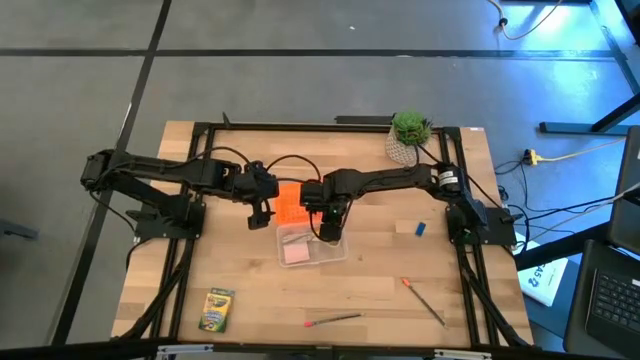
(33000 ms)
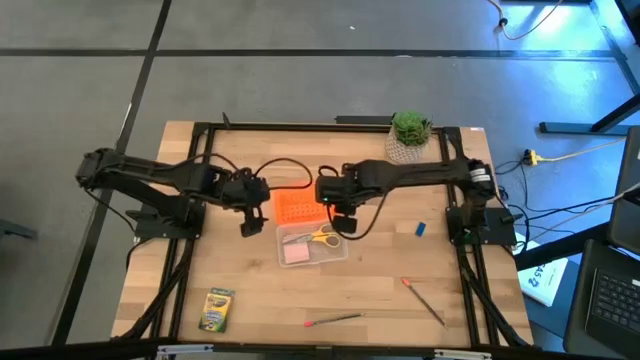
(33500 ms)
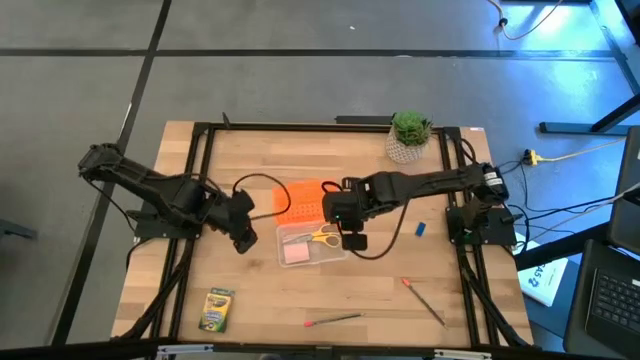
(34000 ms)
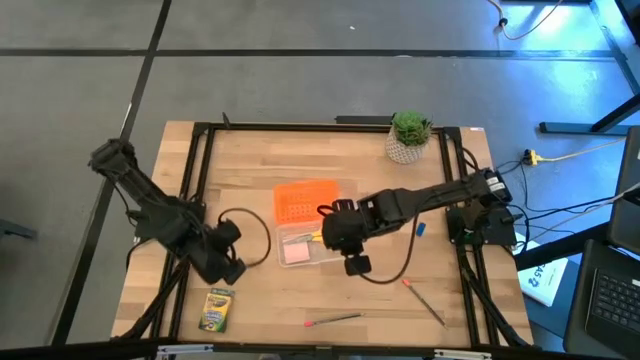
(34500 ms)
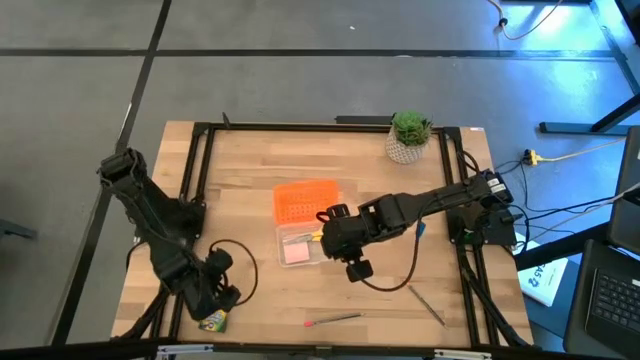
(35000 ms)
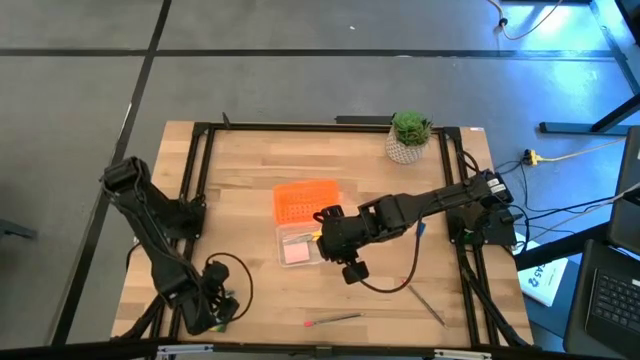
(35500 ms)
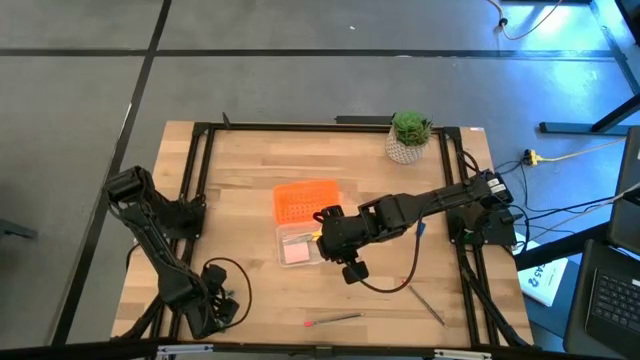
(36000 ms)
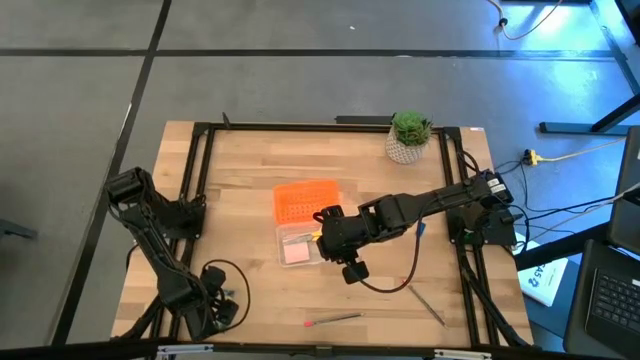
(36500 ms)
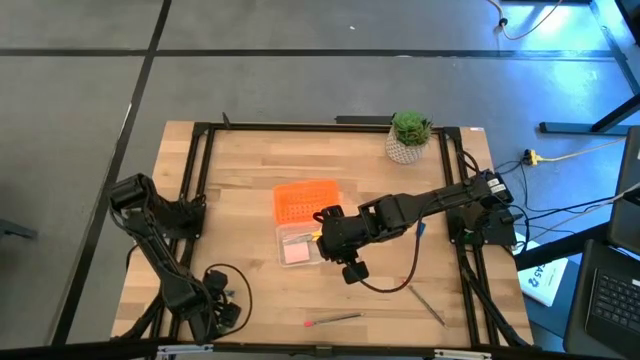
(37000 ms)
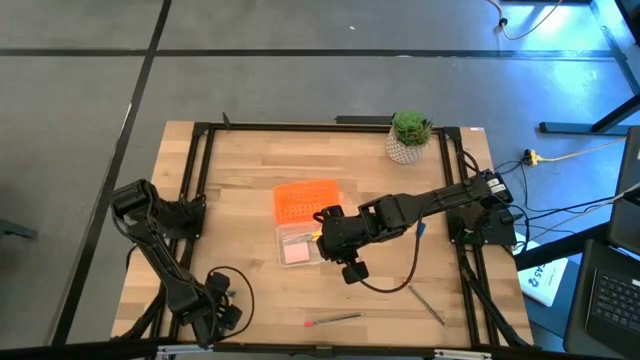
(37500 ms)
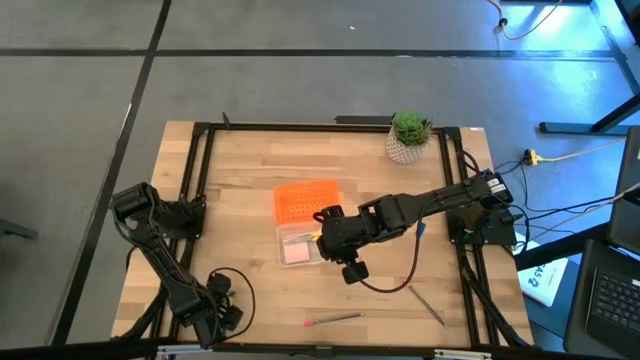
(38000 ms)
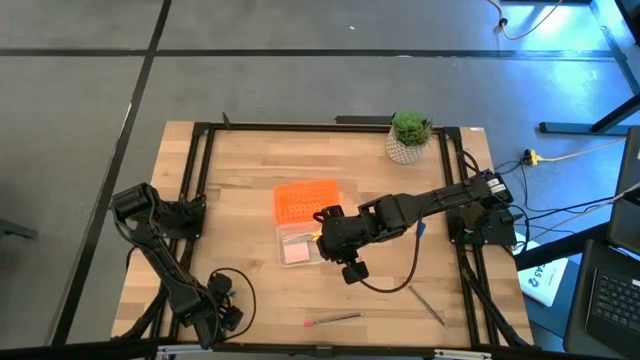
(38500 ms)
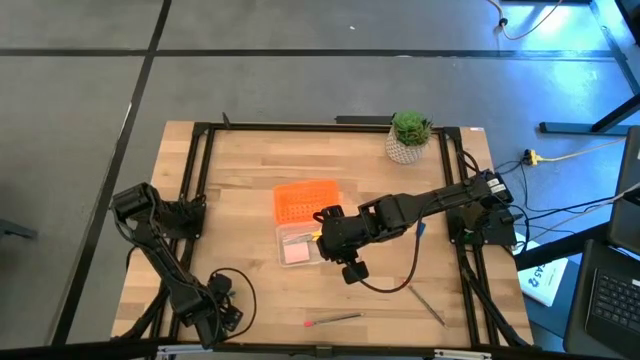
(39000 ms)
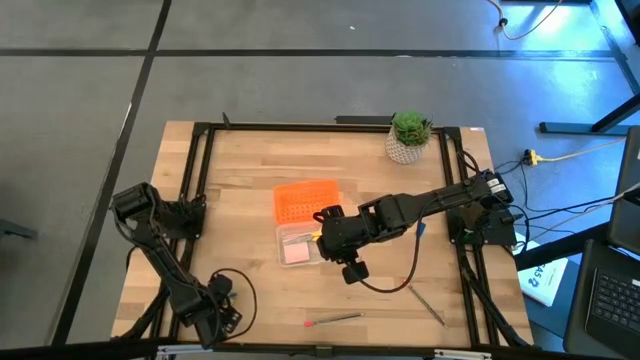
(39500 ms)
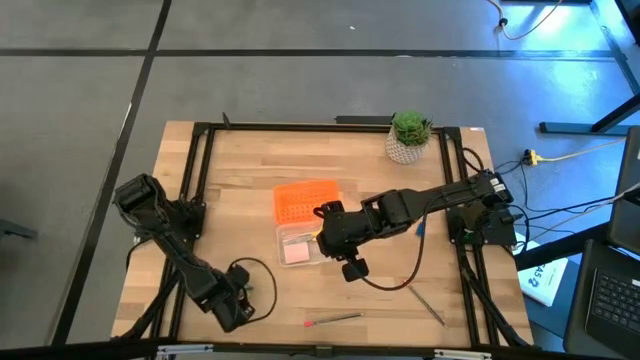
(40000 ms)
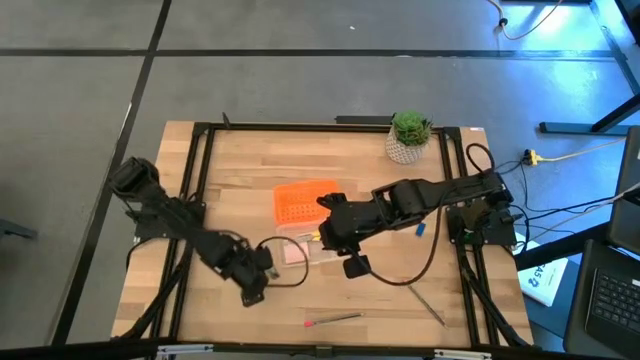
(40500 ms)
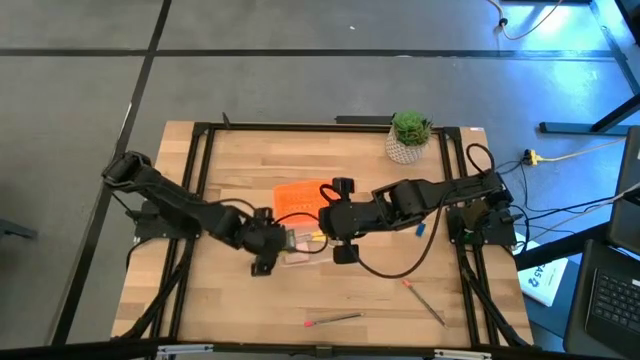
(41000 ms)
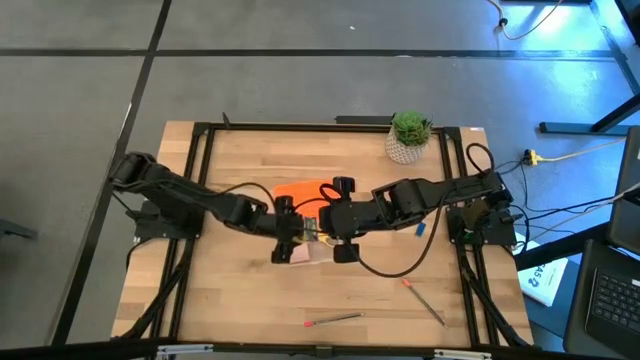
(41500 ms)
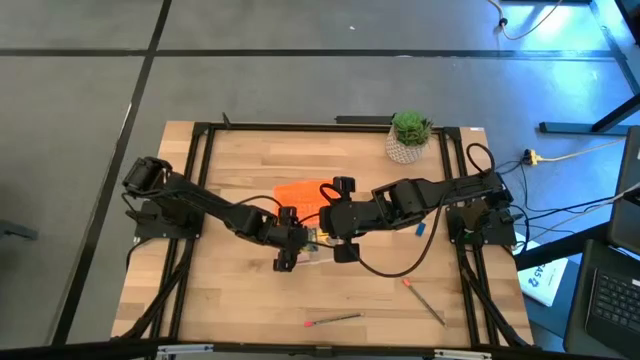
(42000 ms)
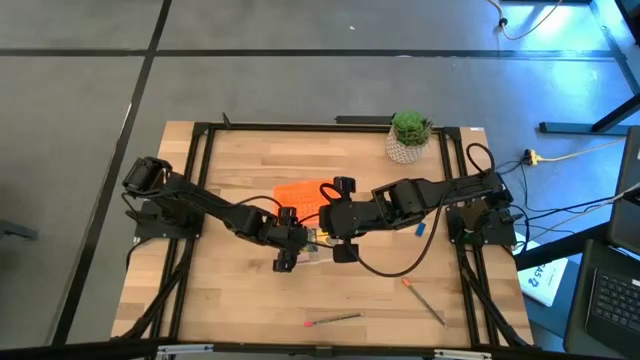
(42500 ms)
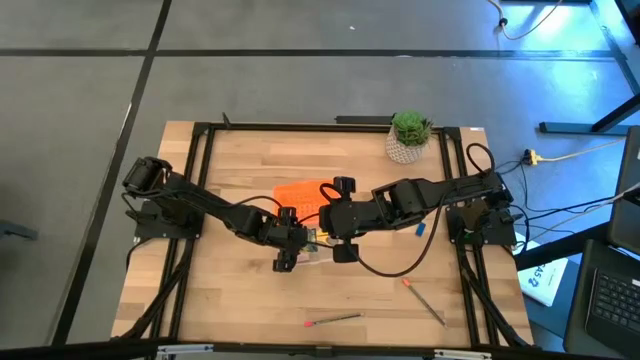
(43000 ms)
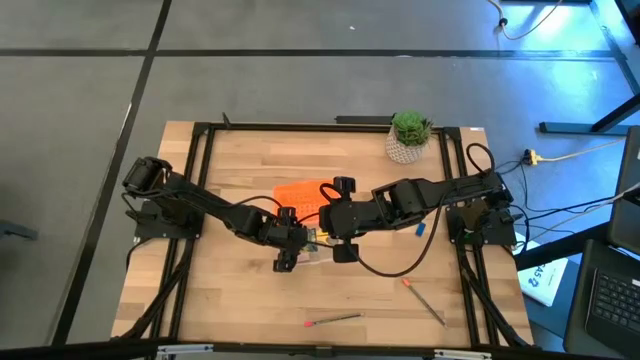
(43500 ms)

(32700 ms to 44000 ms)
Task: Pack school essentials
Put the yellow crayon box into the supply box

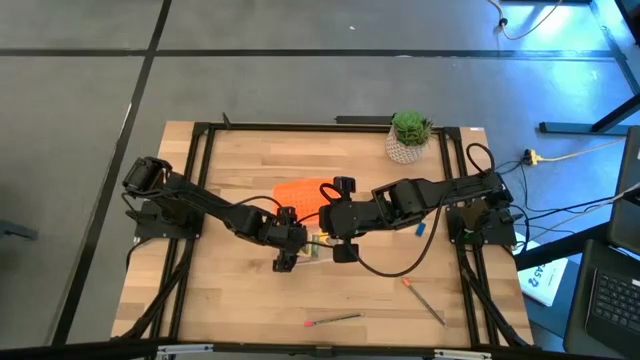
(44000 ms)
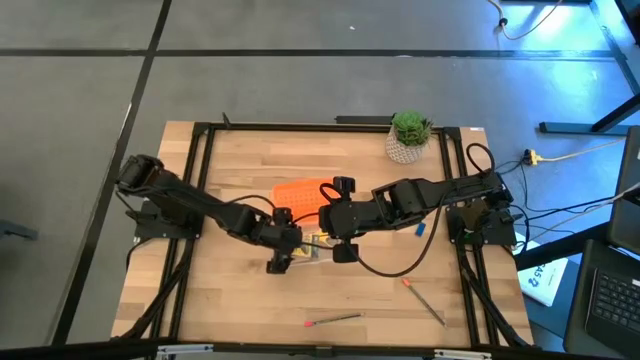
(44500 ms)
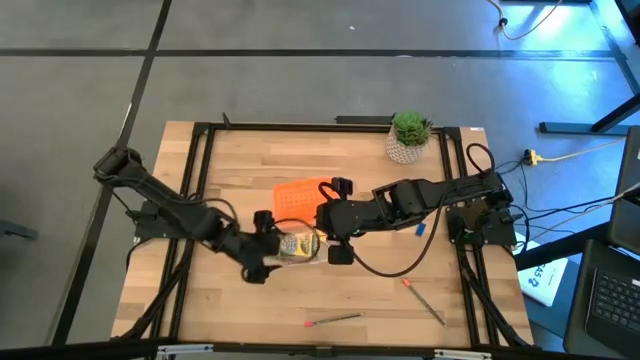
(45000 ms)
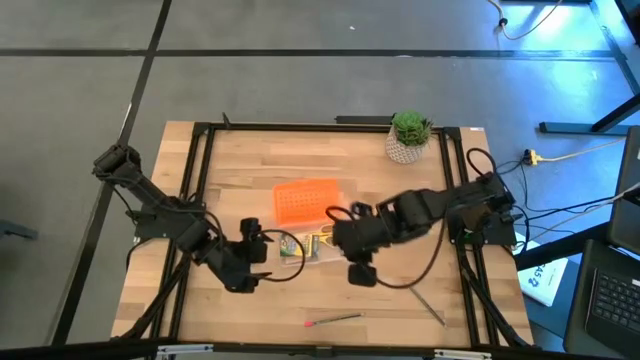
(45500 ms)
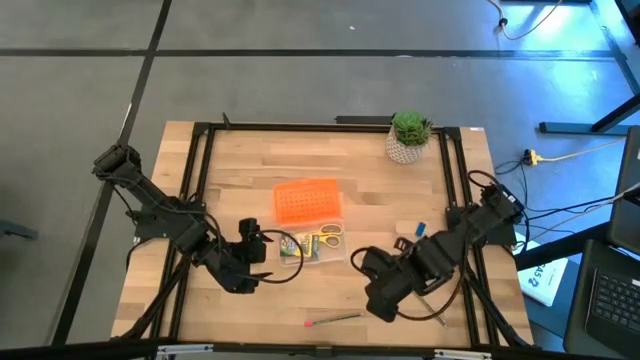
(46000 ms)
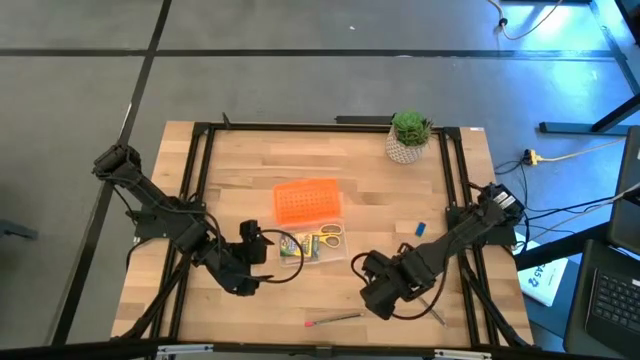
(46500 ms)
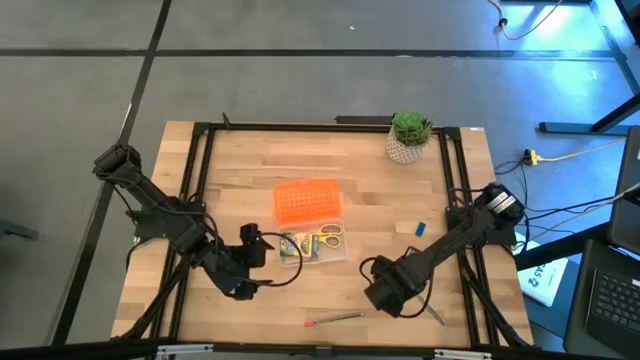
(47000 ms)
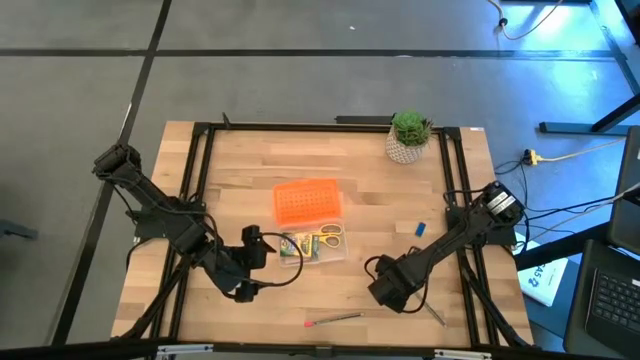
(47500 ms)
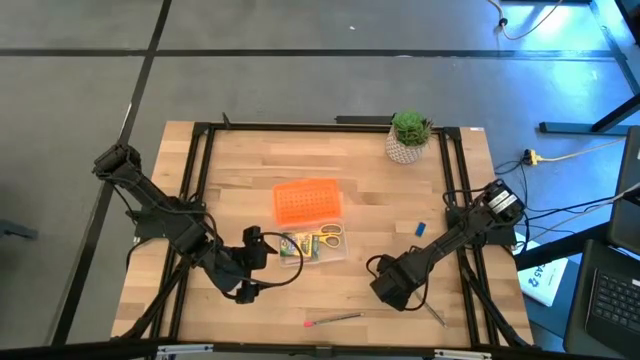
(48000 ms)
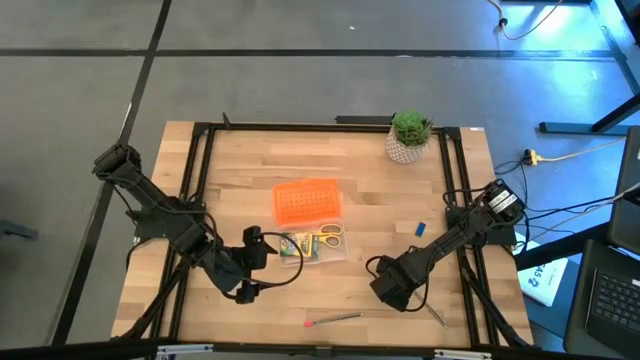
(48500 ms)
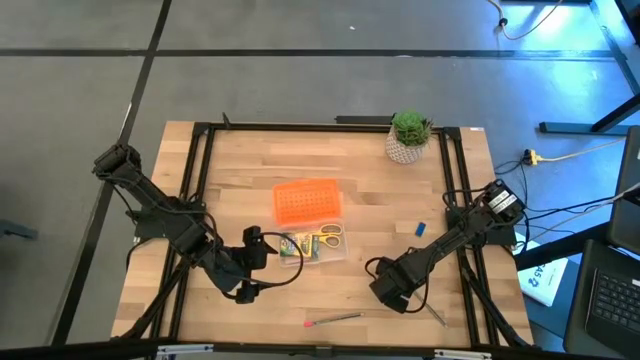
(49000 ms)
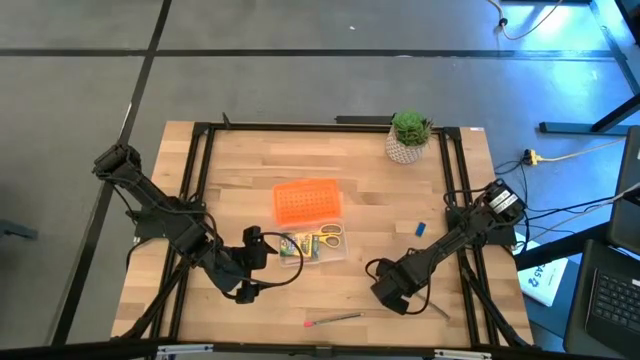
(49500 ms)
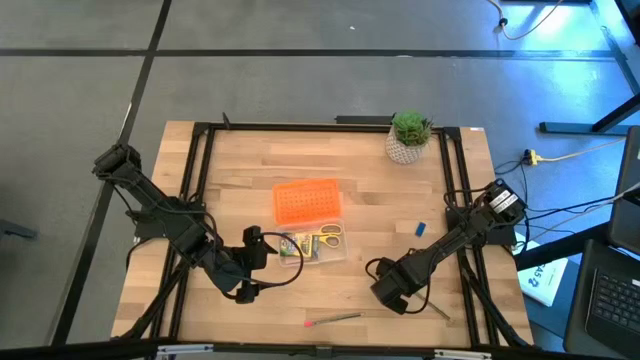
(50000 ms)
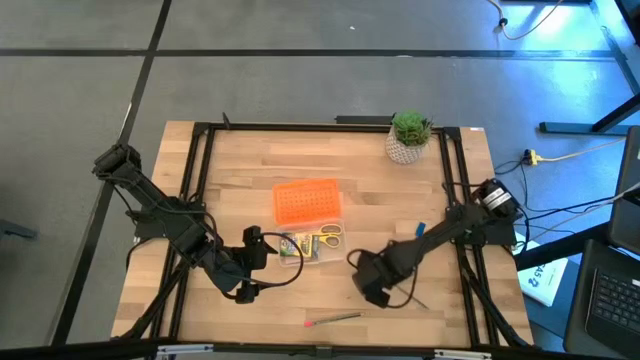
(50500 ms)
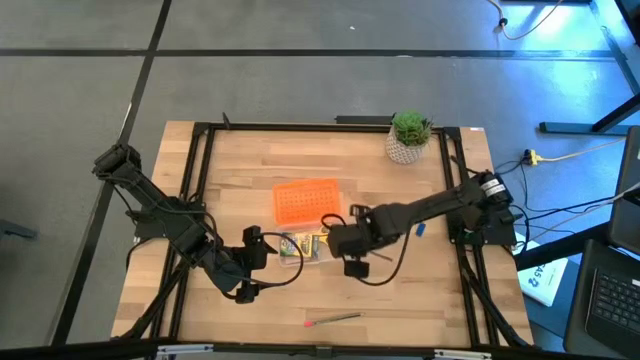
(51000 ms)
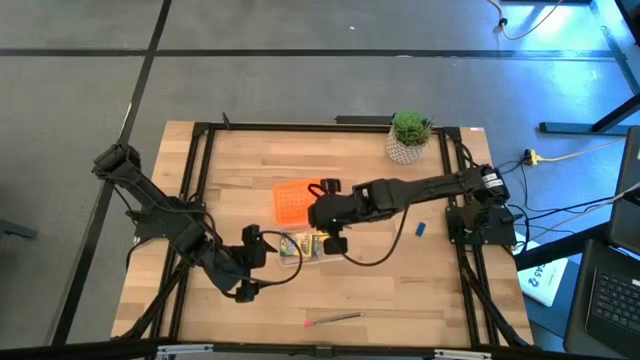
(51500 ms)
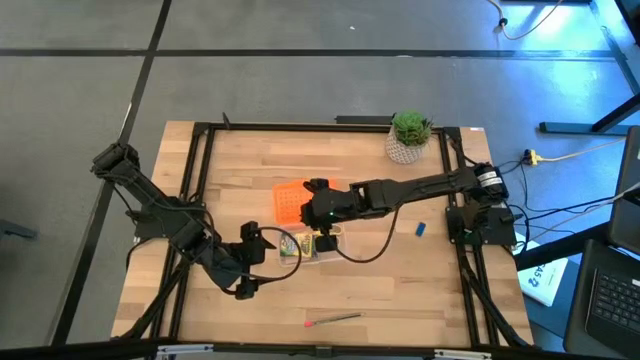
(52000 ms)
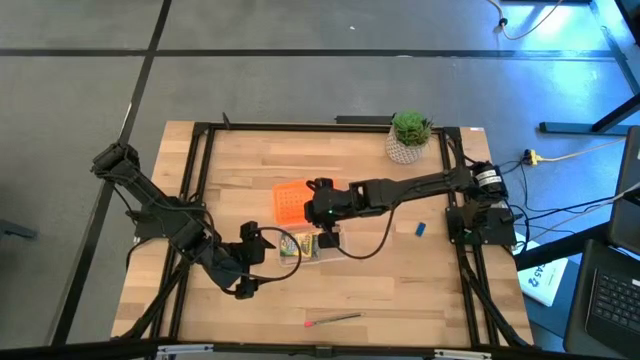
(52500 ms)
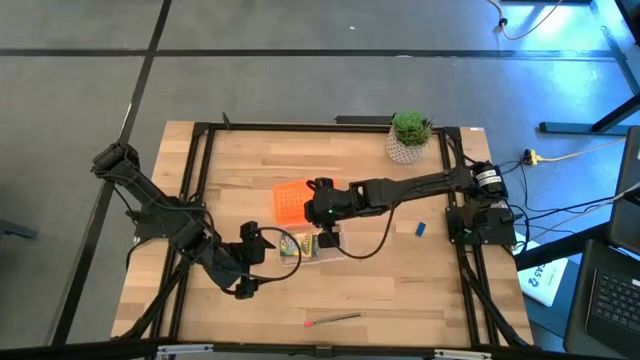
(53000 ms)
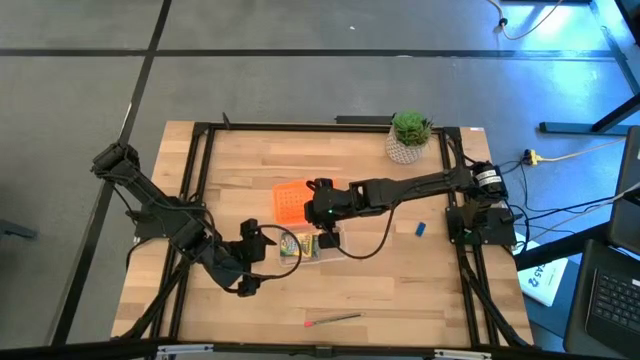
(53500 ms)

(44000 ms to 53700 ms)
Put the right black pencil into the supply box

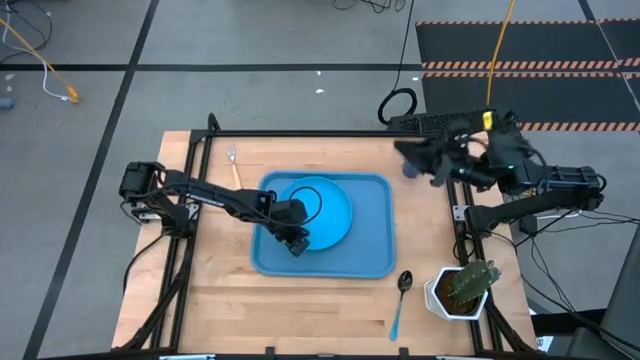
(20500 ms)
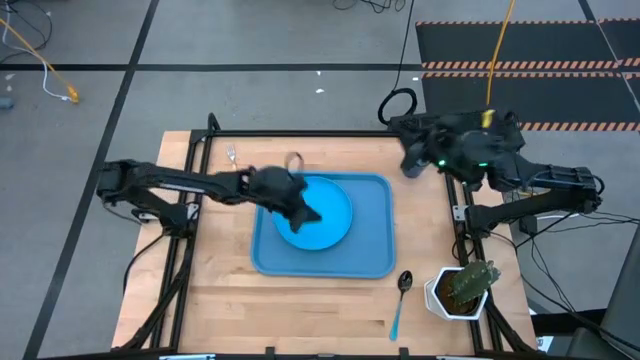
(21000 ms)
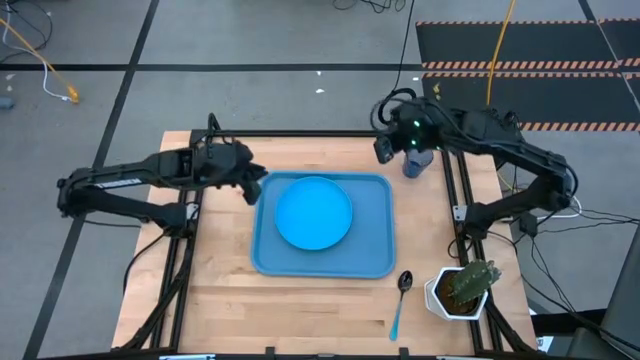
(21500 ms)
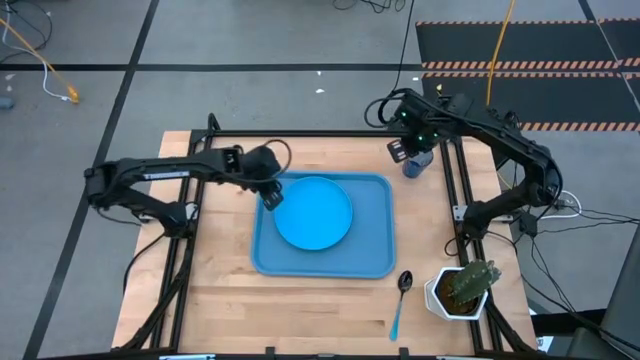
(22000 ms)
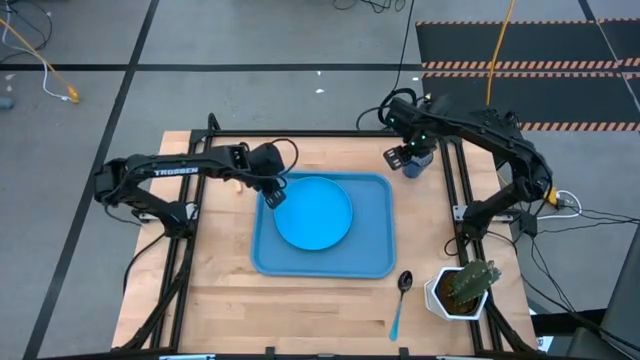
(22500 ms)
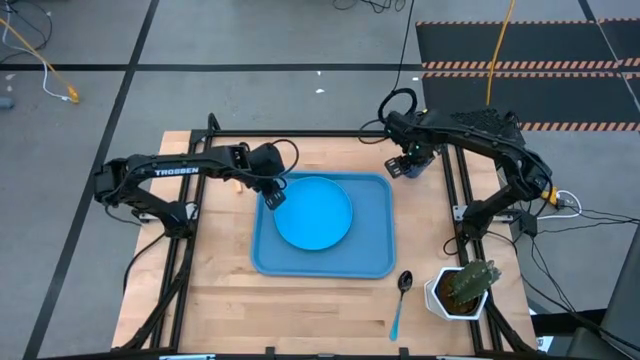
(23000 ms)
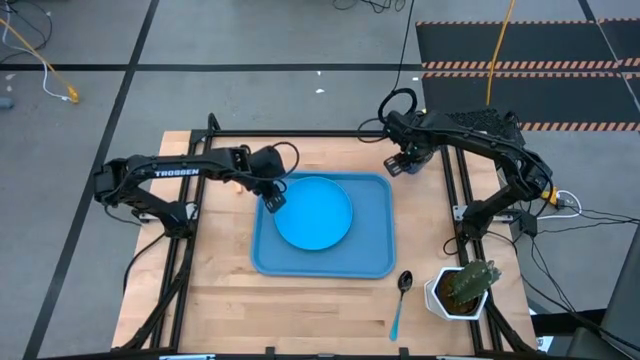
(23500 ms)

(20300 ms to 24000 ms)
Task: Pick and place plate/cup/fork/spoon on tray
Put the blue cup on the blue tray to the top right of the blue plate
